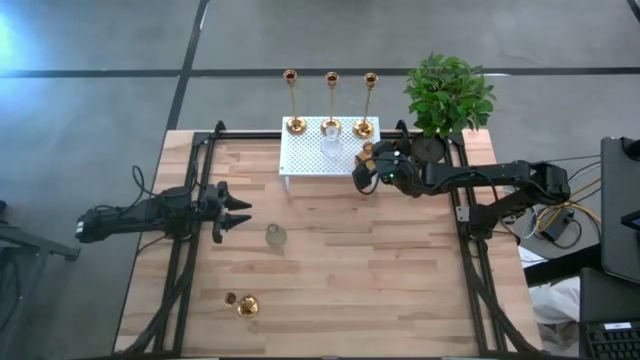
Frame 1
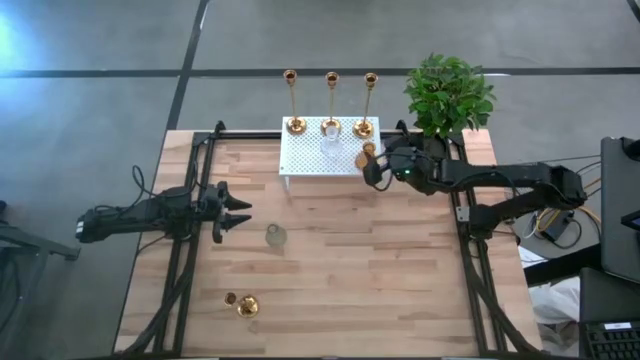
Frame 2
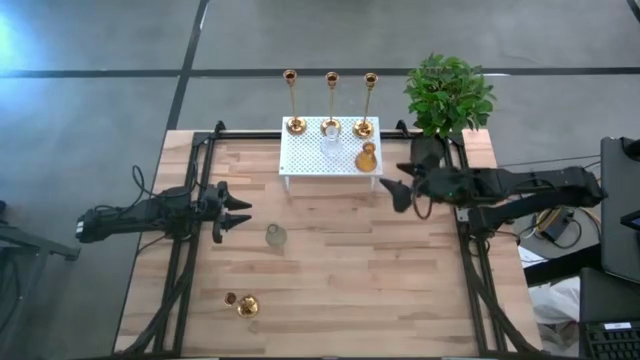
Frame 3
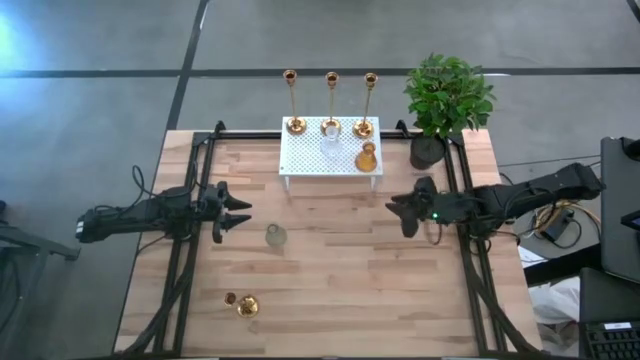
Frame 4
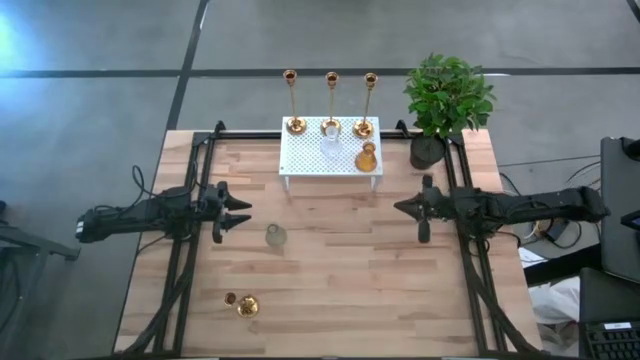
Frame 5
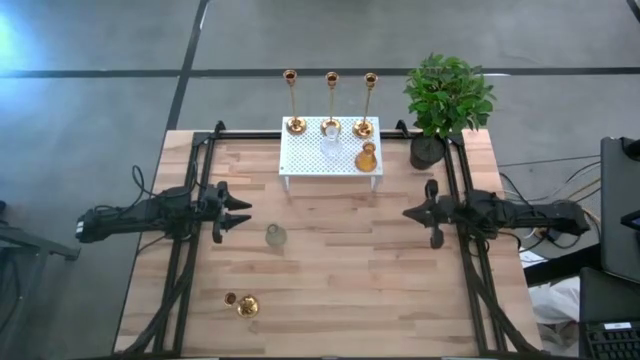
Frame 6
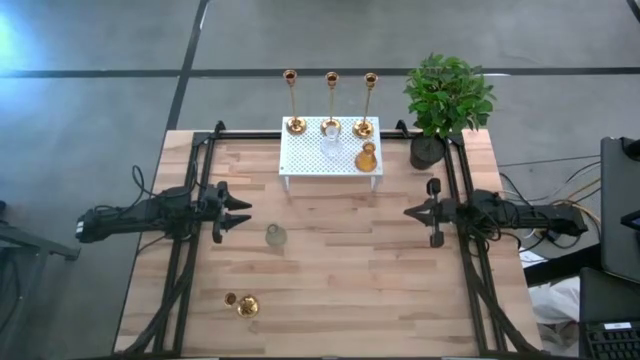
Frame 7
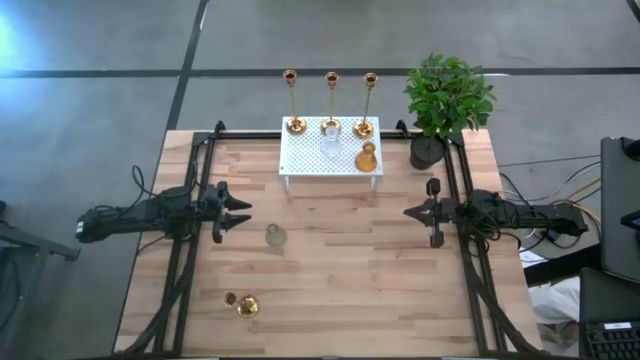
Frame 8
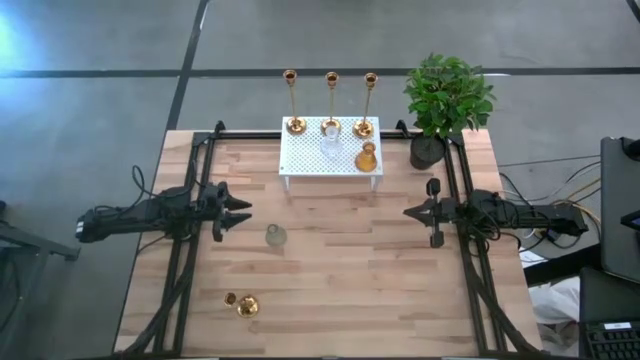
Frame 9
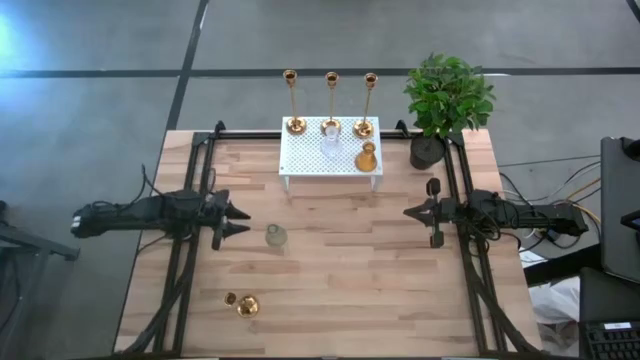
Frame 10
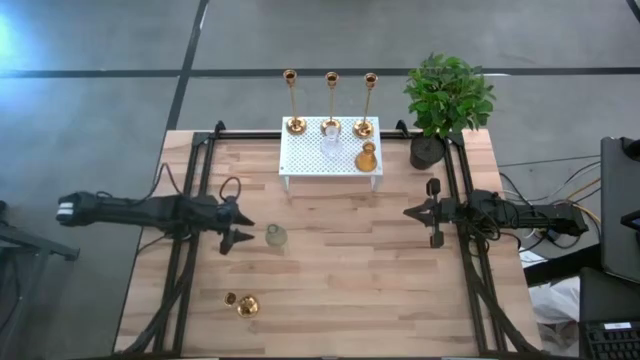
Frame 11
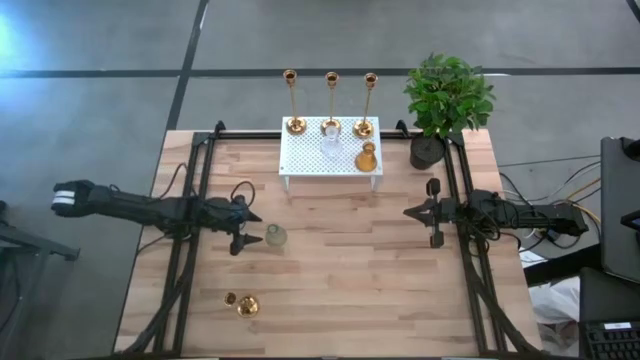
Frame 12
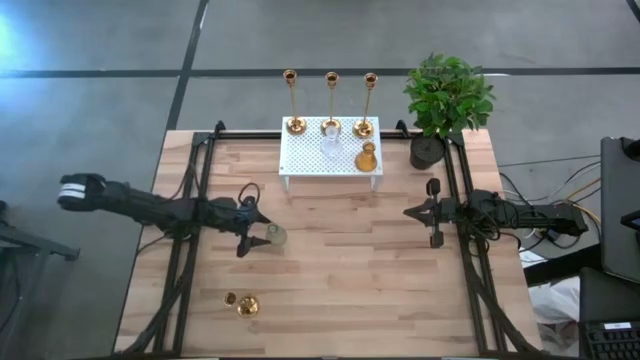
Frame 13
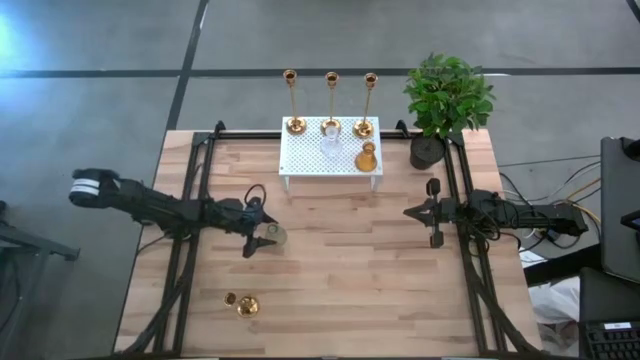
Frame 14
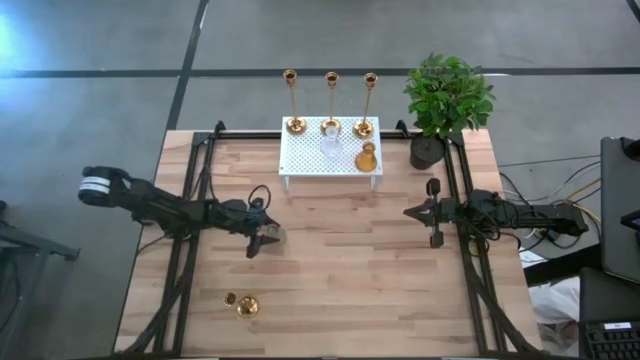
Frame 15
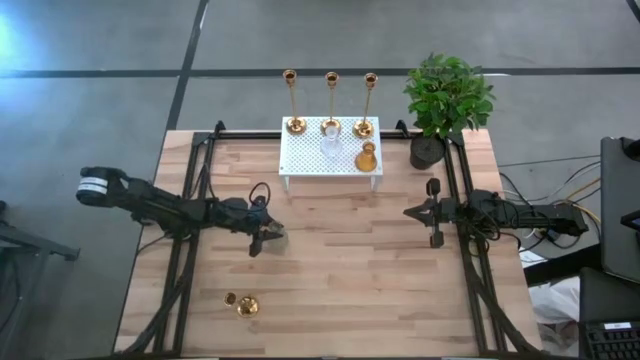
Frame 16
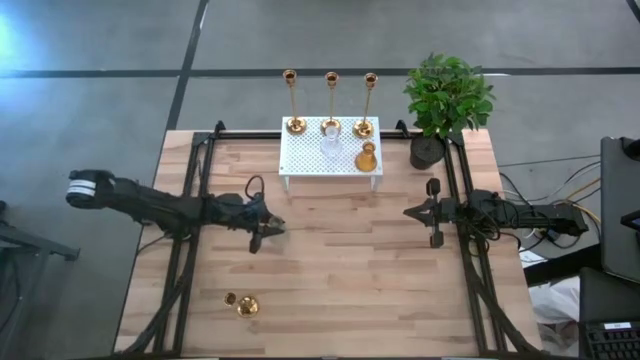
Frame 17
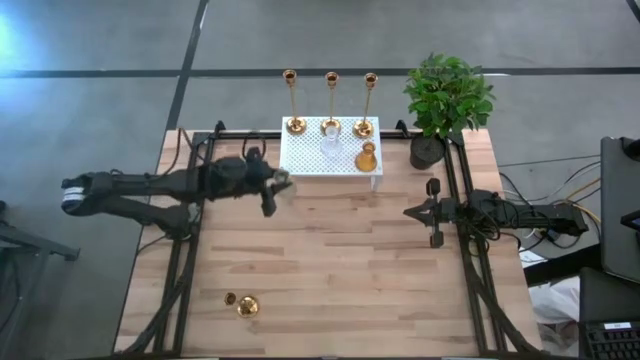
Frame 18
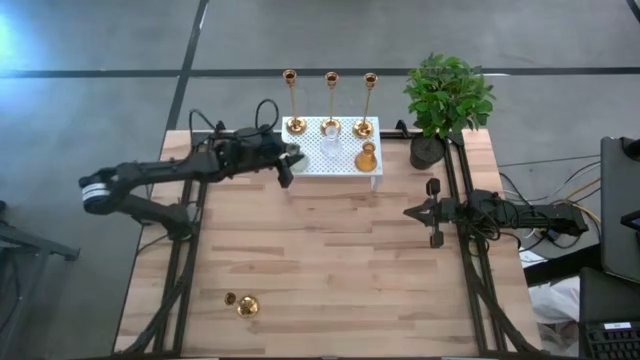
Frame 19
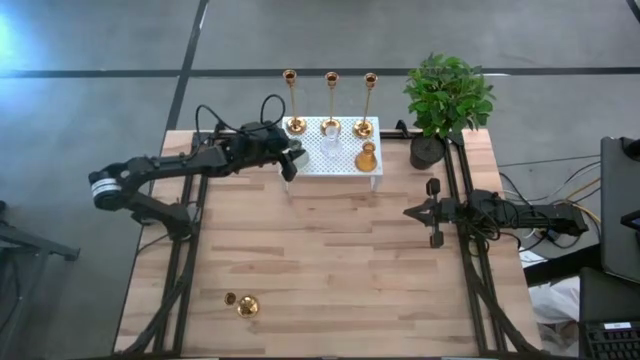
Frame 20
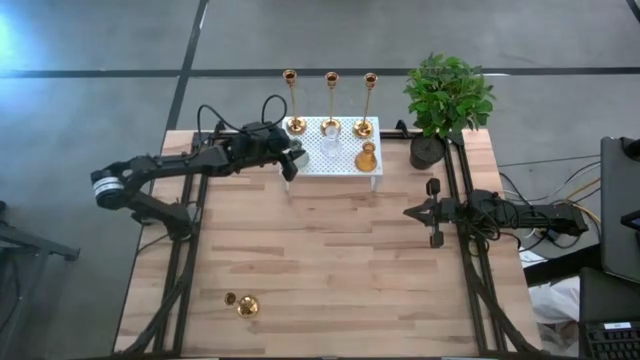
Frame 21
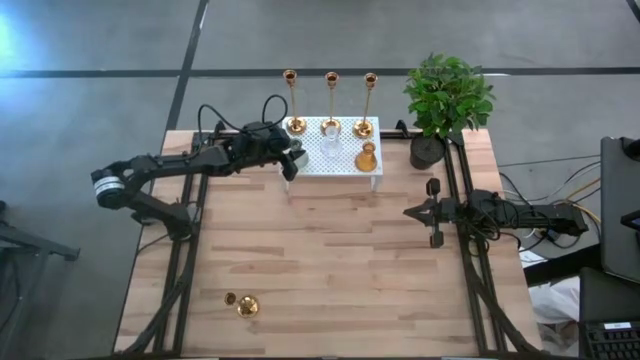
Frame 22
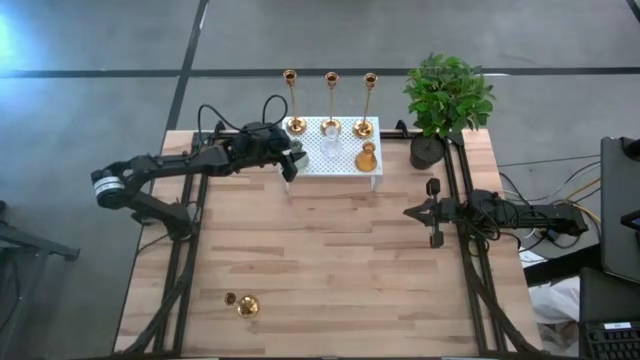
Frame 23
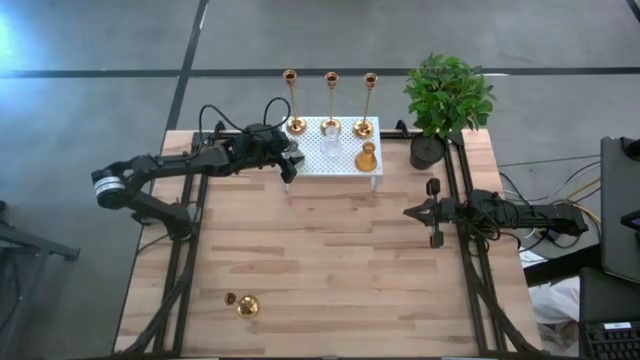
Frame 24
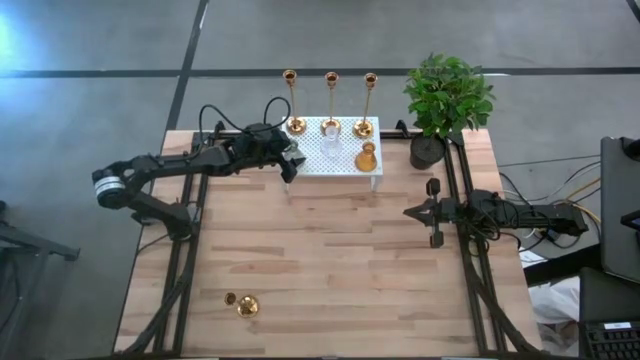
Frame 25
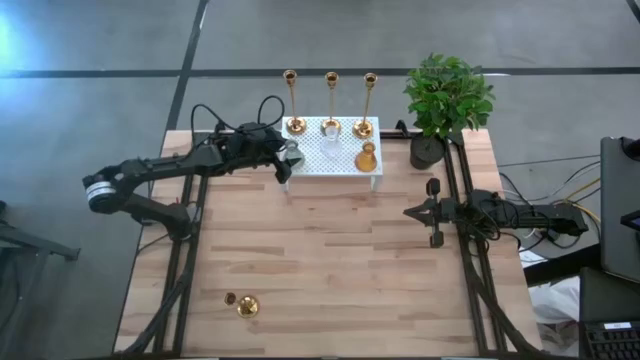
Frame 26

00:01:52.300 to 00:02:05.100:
Task: Pick & Place candle stick holders
Put the green glass candle holder on the shelf

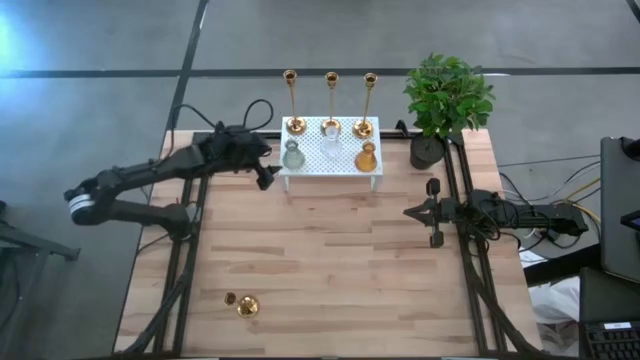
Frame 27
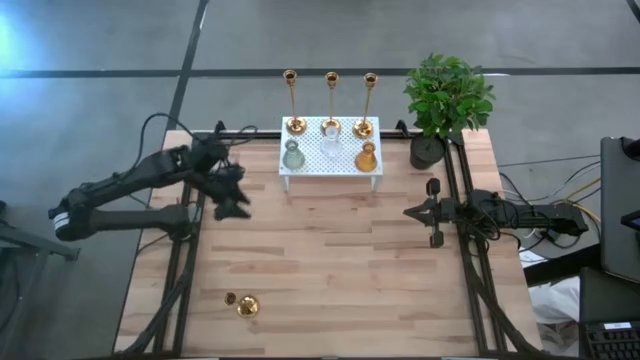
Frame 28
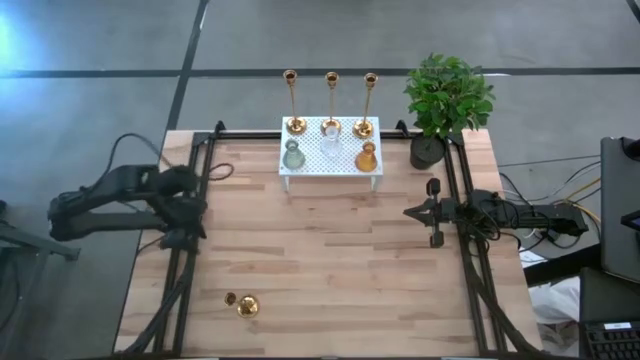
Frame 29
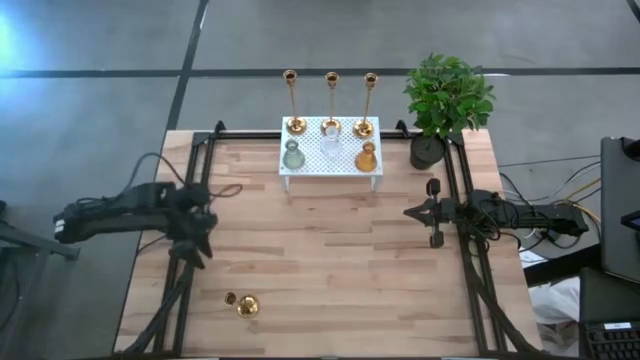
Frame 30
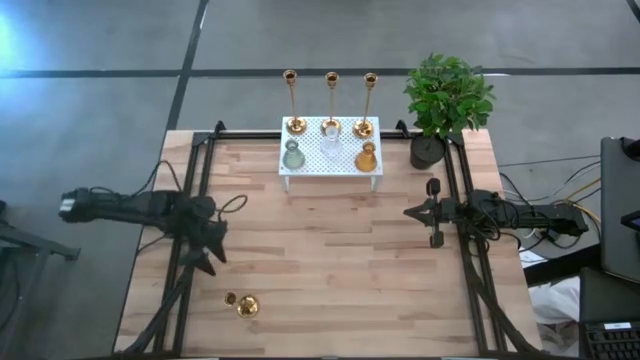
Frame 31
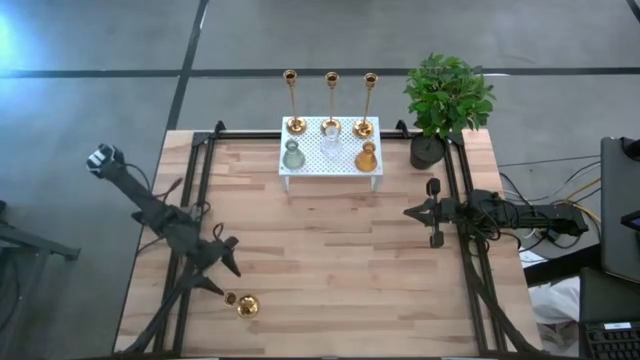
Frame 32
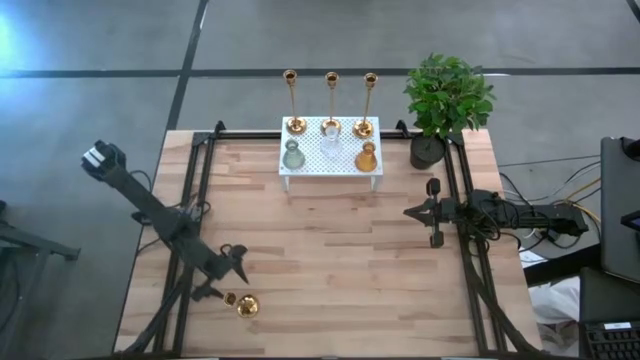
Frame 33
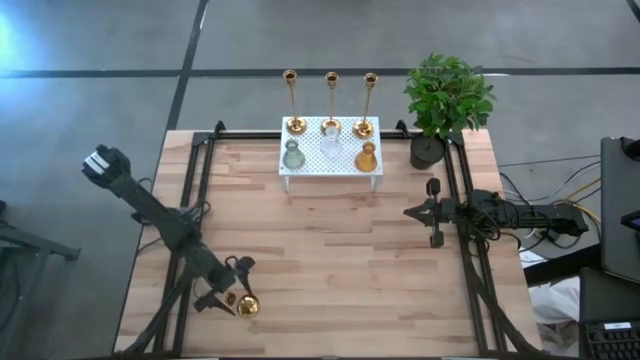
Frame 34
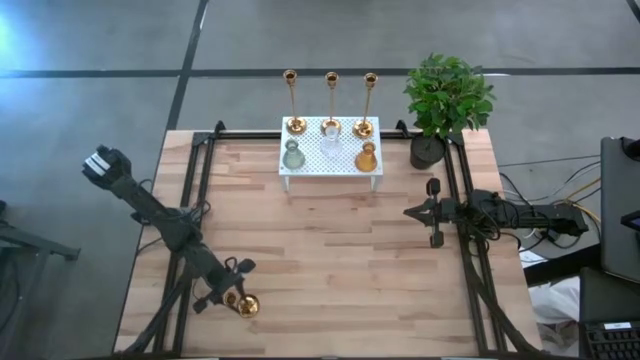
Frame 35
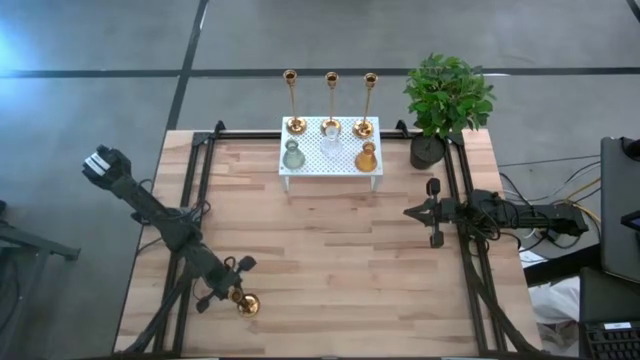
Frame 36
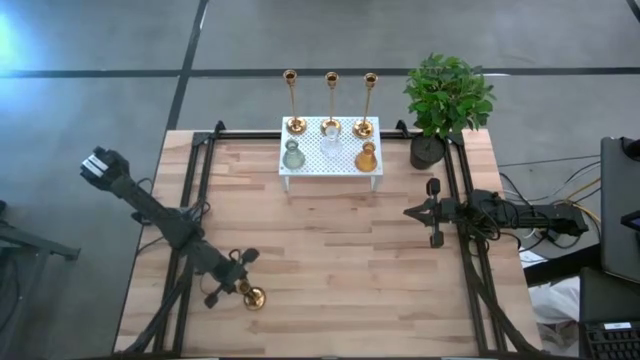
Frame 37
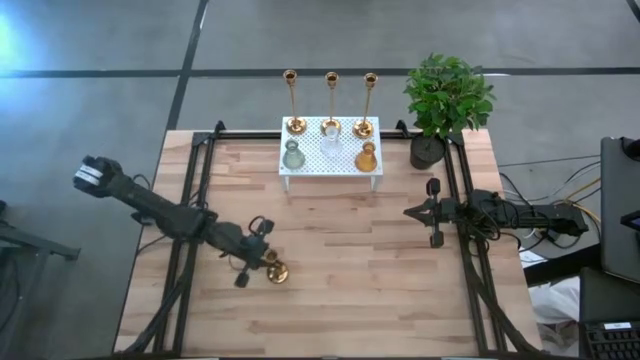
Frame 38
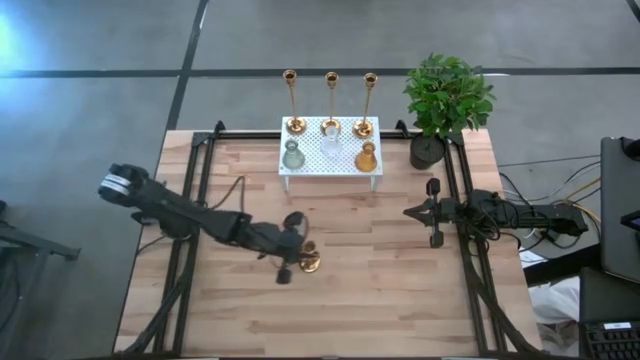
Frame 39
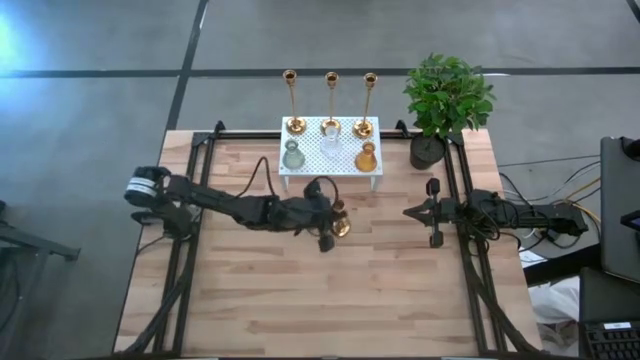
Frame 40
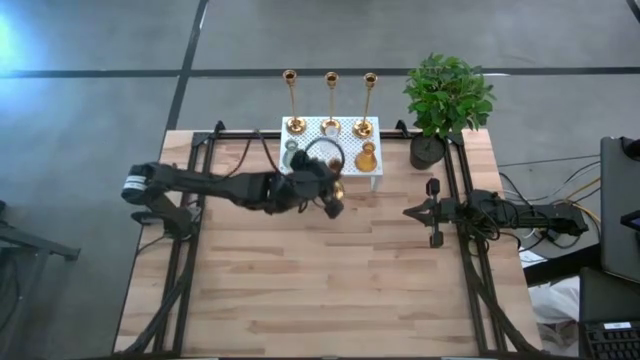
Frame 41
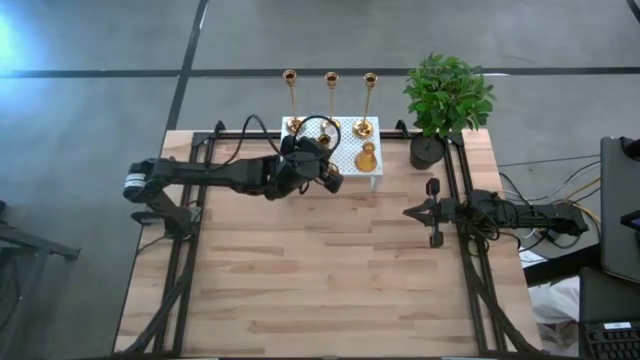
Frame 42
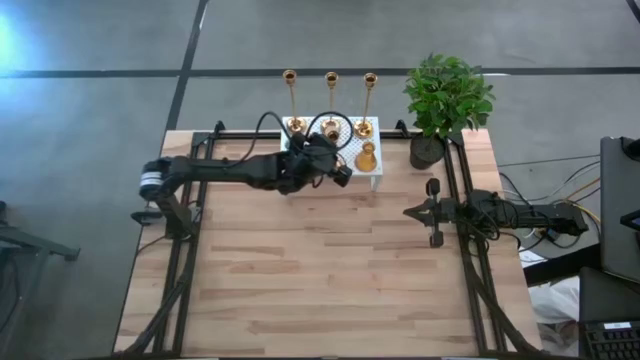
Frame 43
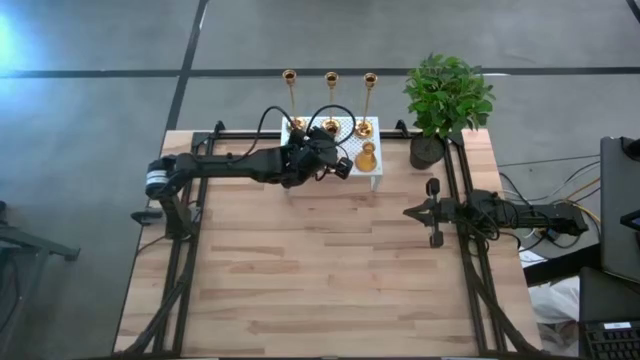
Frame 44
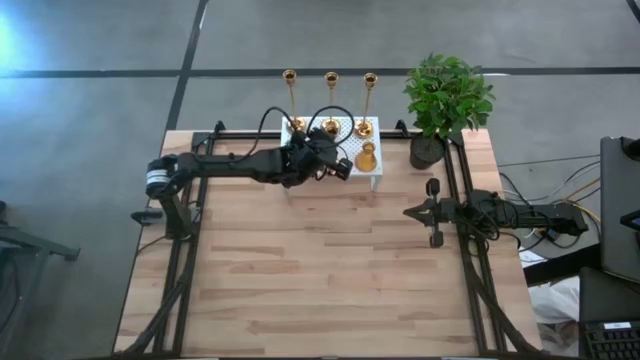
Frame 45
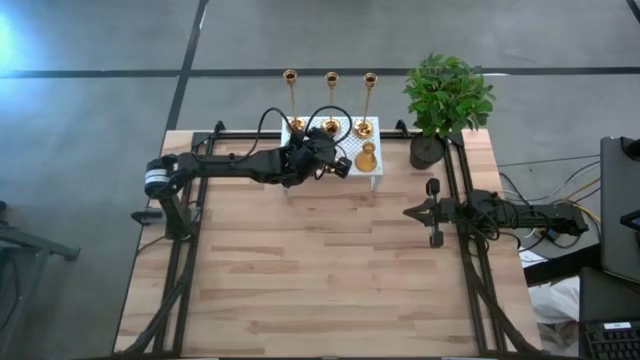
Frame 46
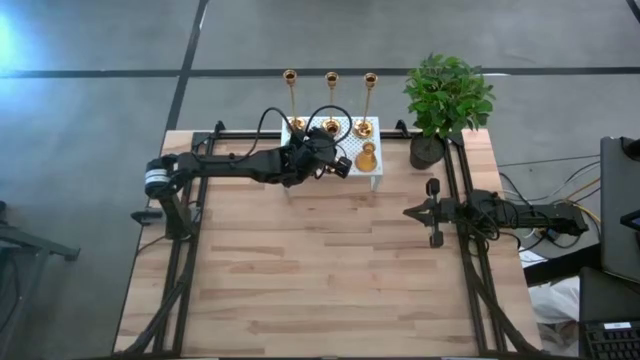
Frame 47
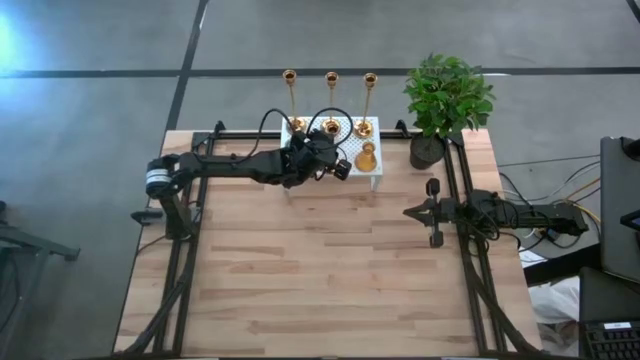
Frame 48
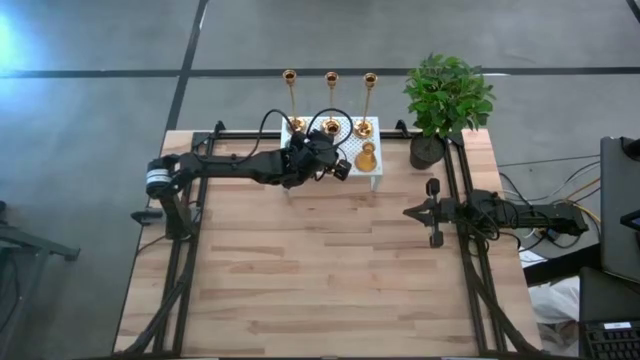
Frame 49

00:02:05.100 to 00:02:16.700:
Put the gold candle holder on the shelf
